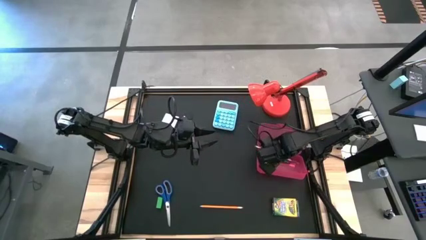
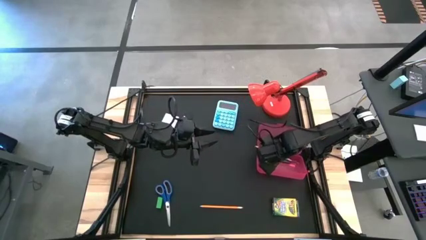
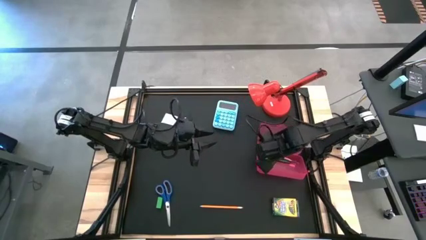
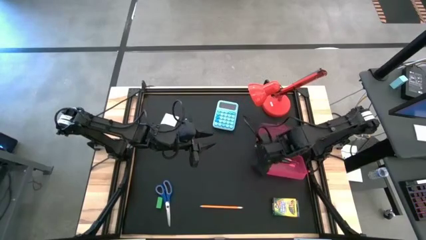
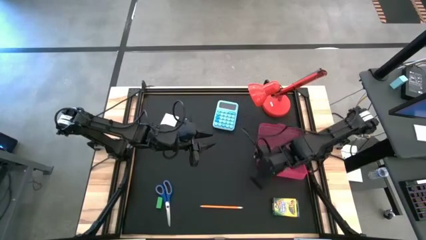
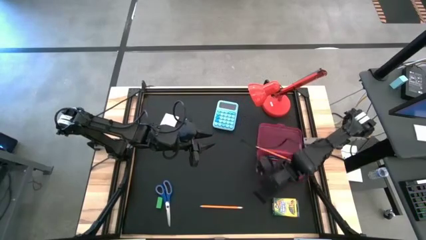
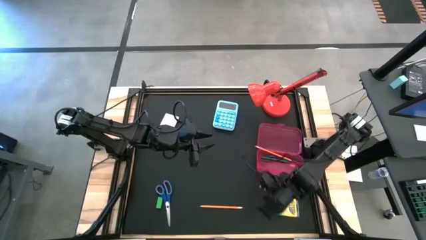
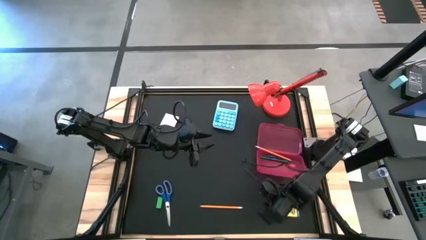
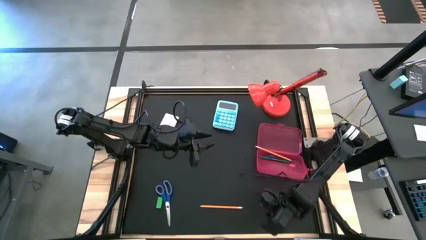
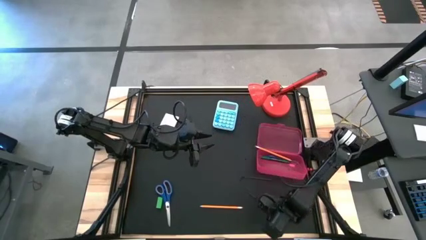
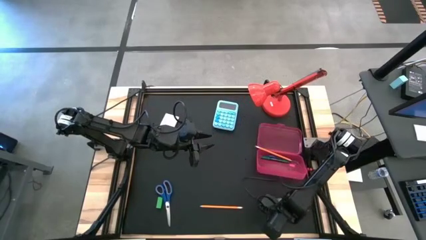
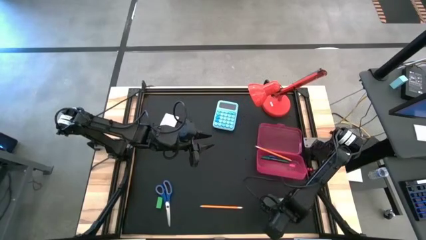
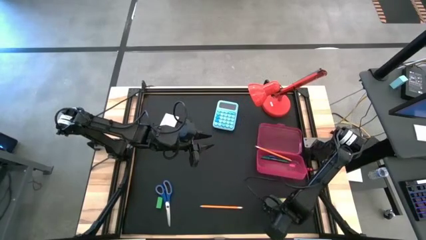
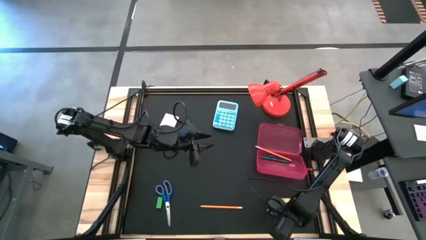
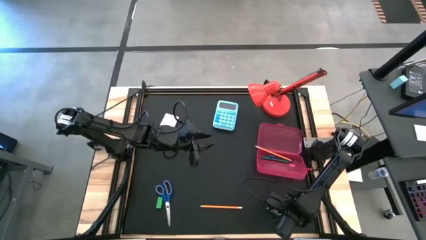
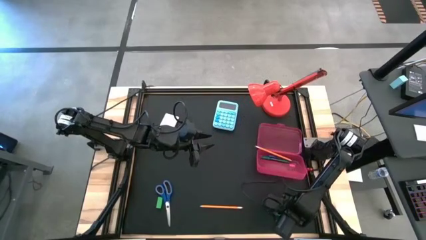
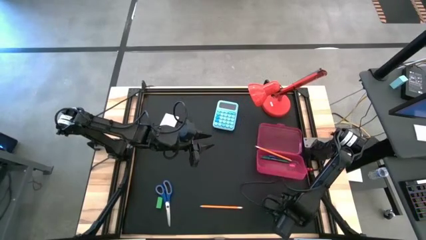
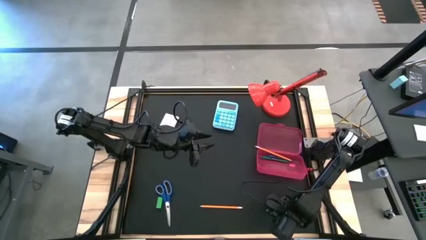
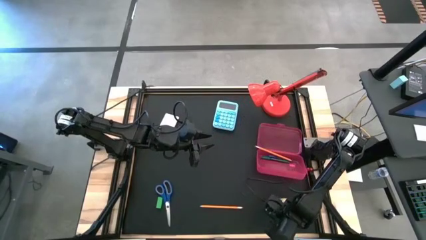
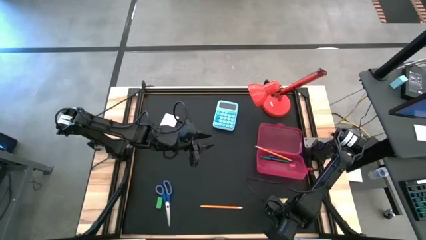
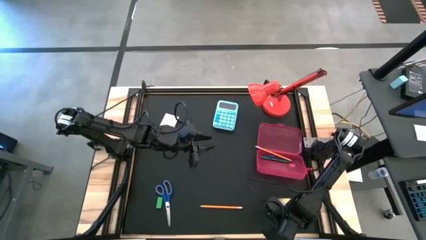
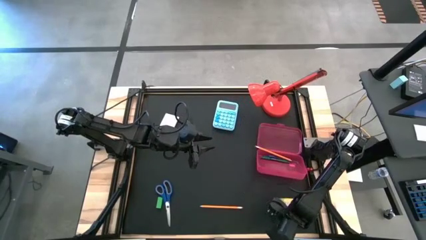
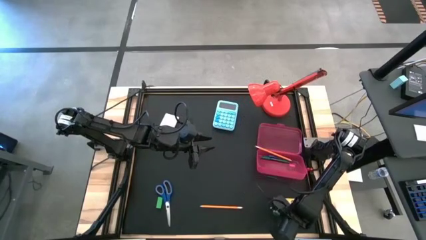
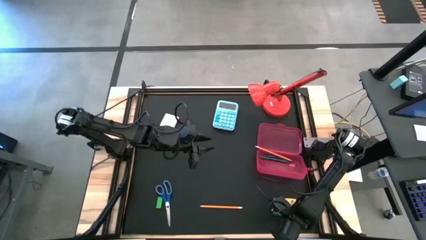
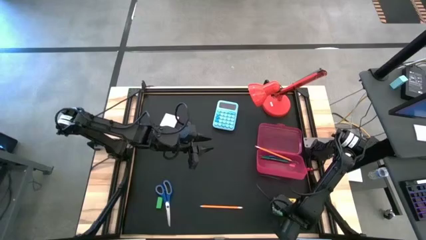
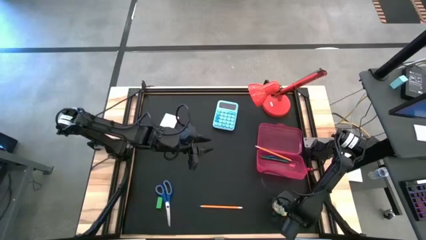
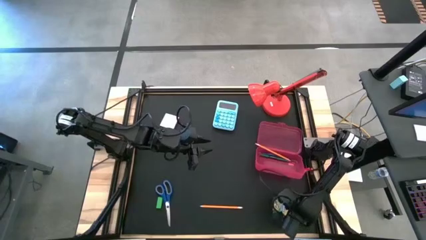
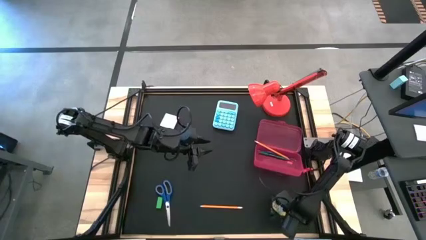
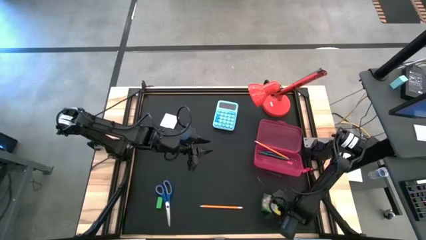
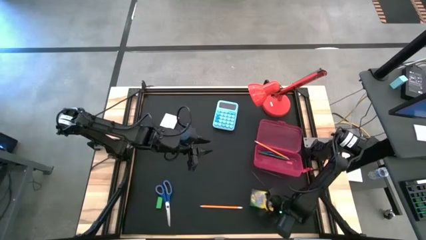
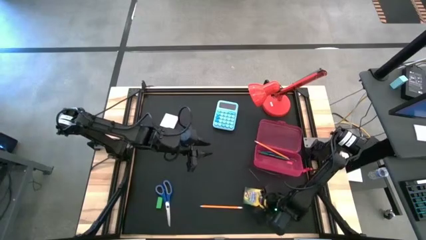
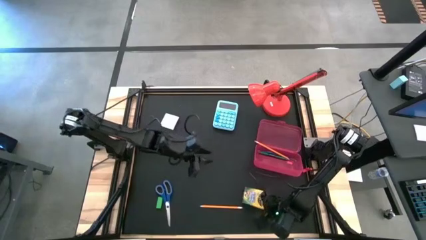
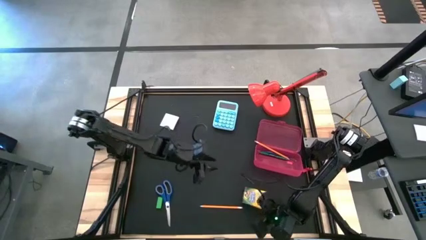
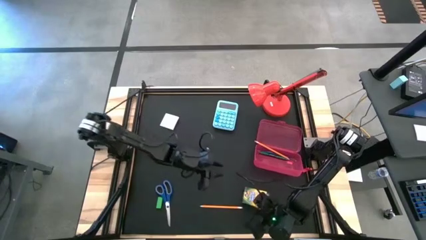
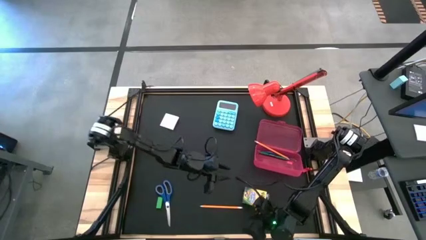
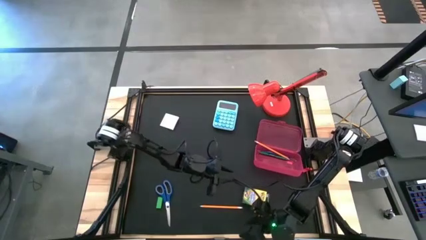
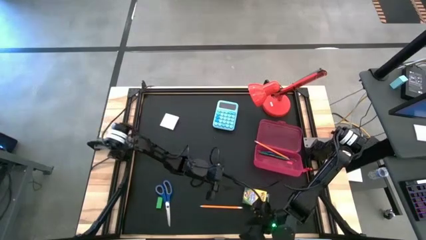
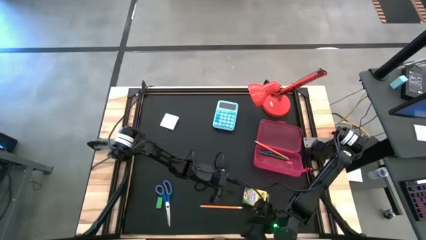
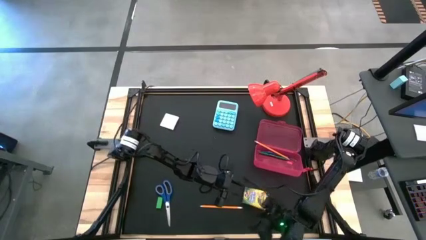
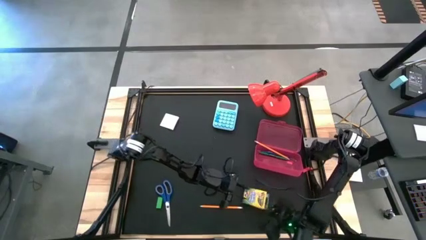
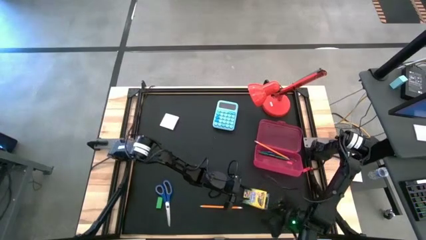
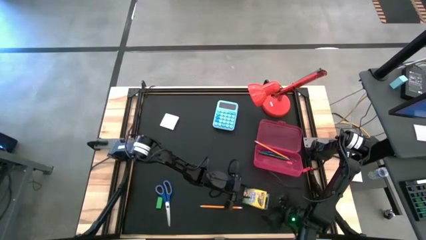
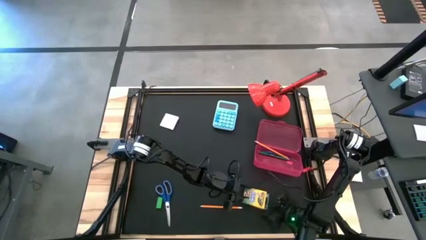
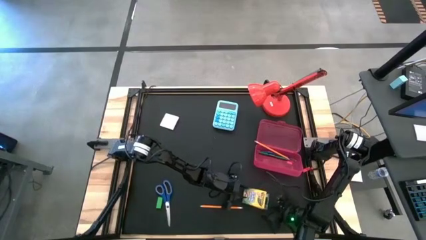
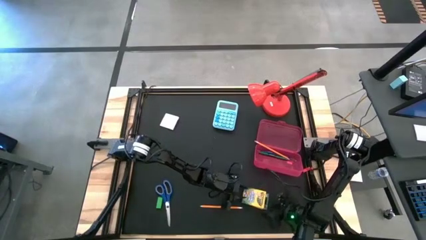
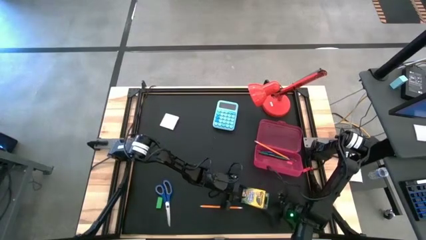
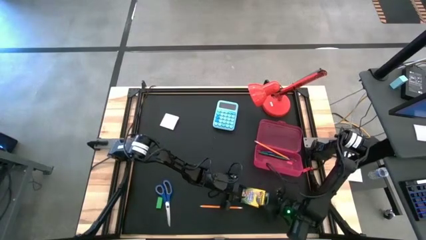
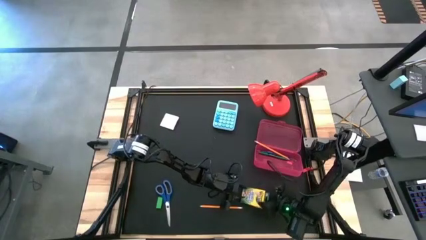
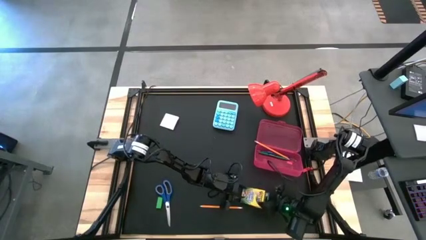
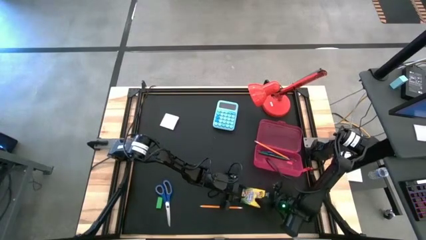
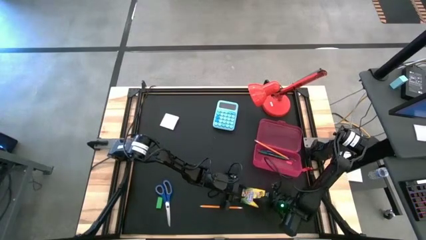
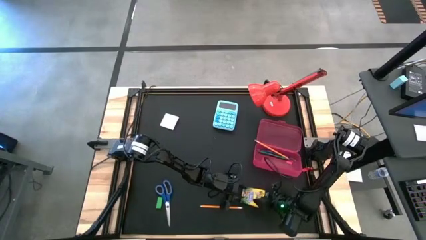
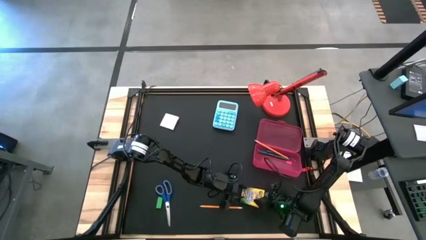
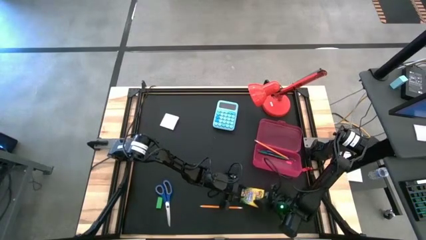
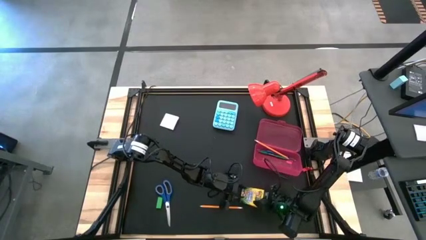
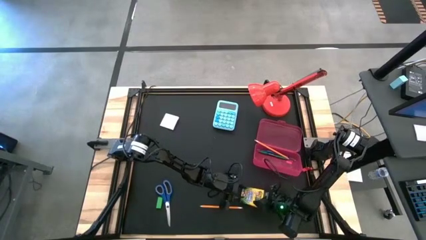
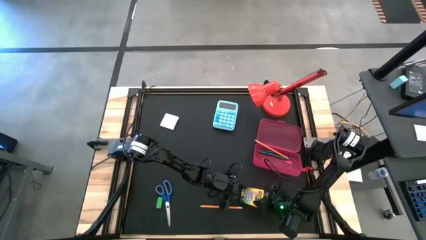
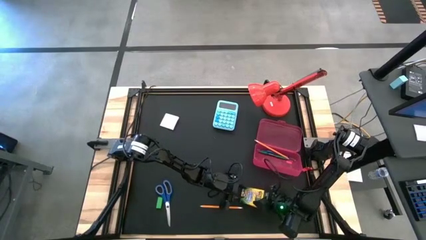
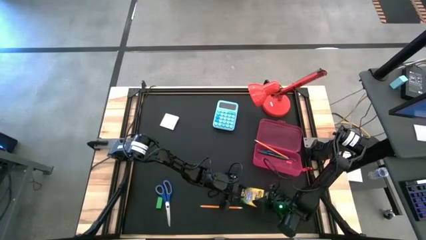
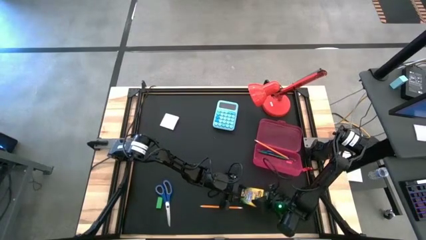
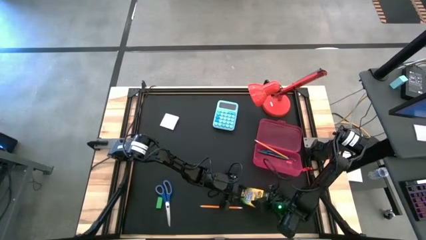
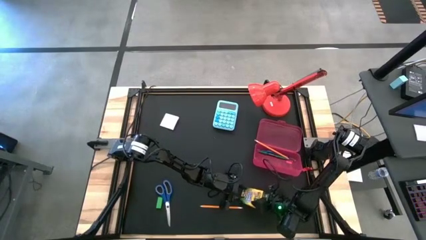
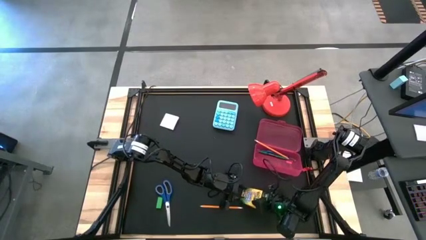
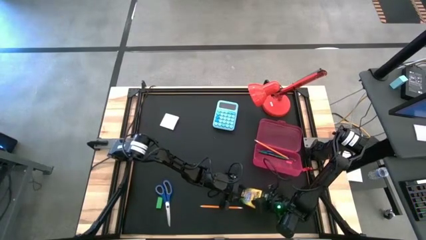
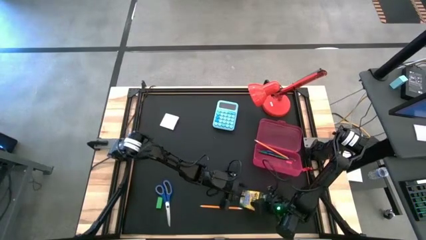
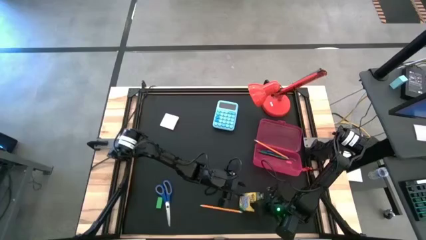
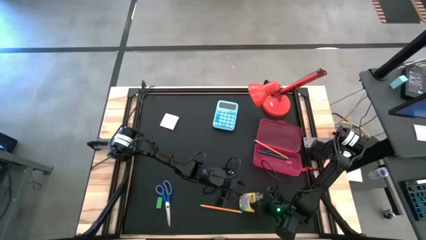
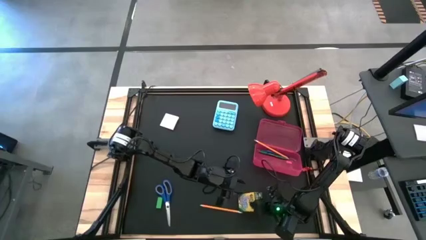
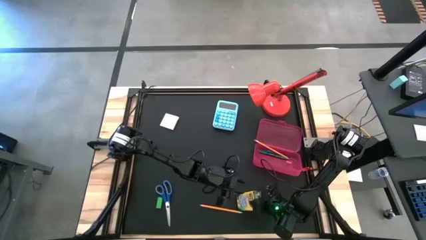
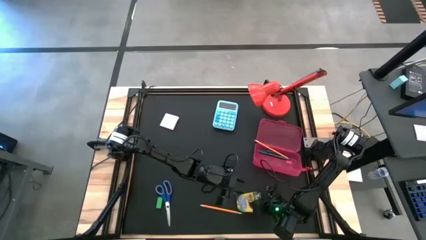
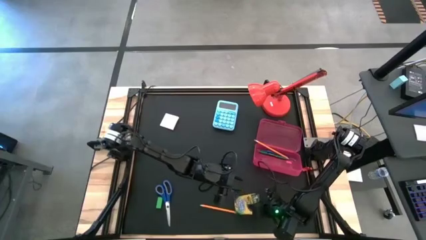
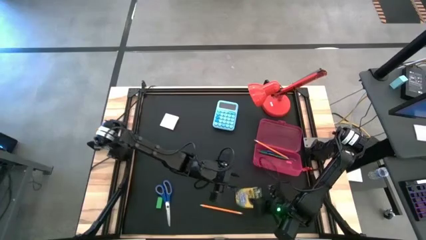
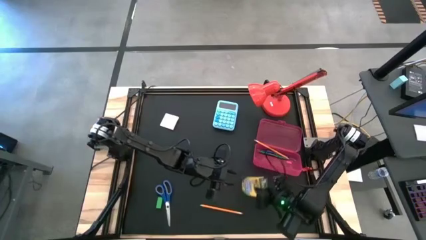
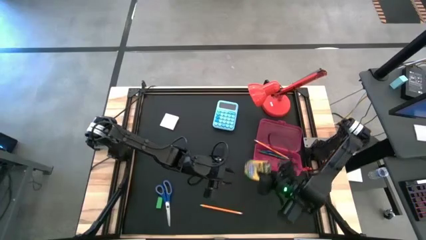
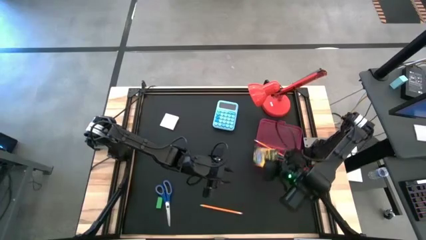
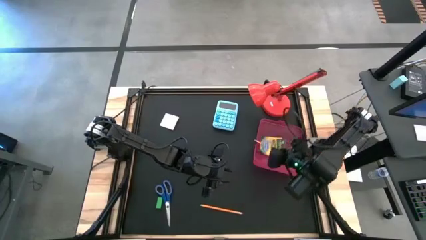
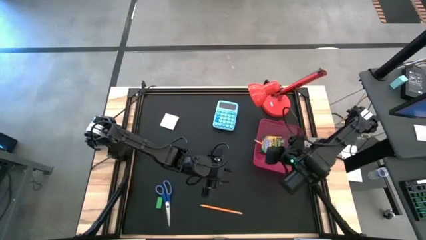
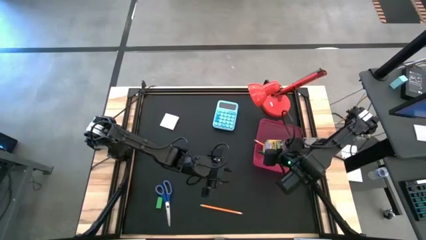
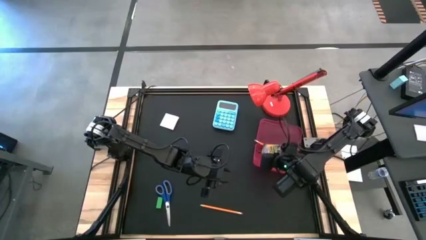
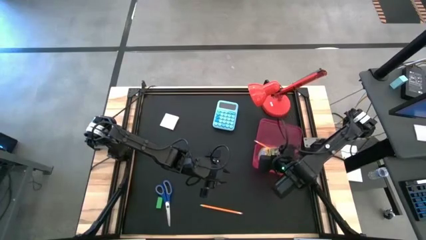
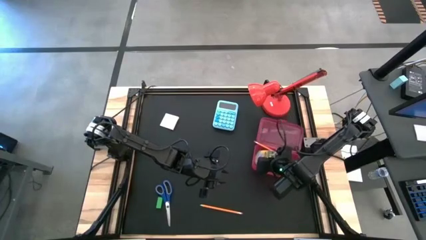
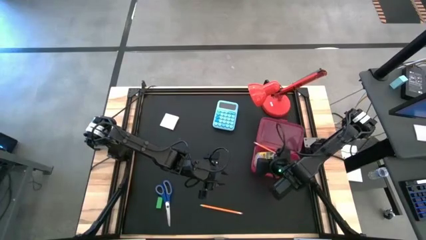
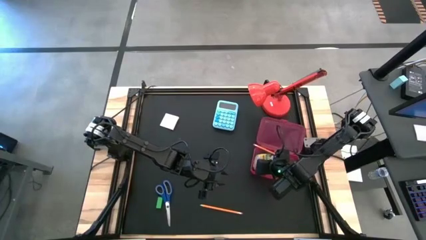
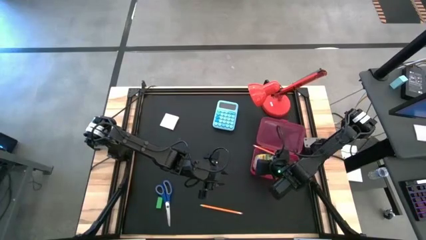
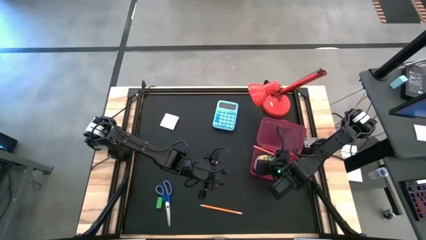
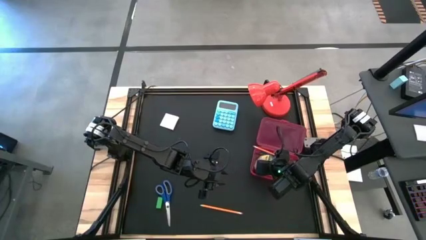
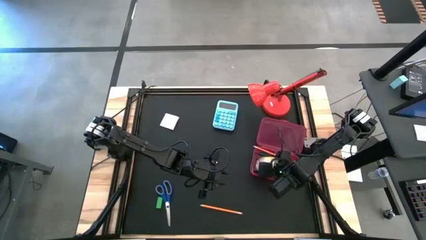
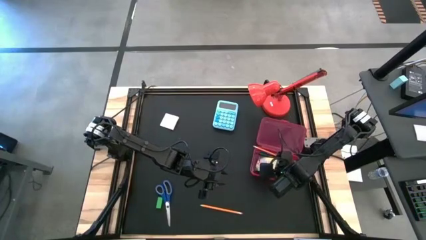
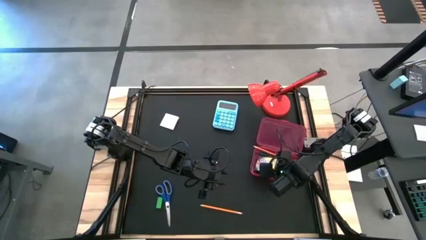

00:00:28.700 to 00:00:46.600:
Task: Pack school essentials
Put the crayon box into the red supply box
